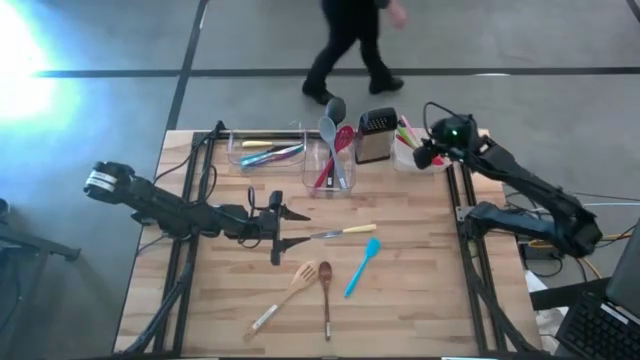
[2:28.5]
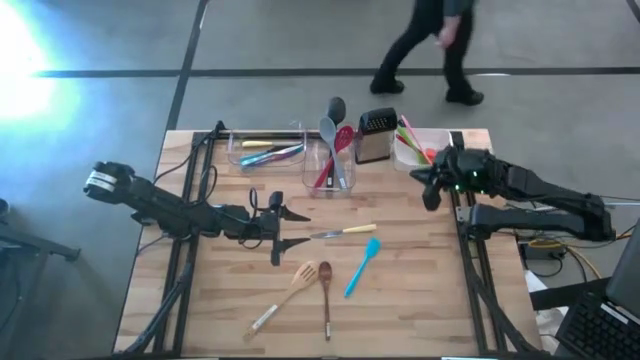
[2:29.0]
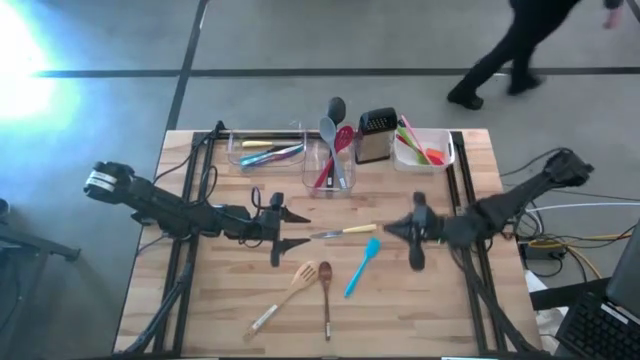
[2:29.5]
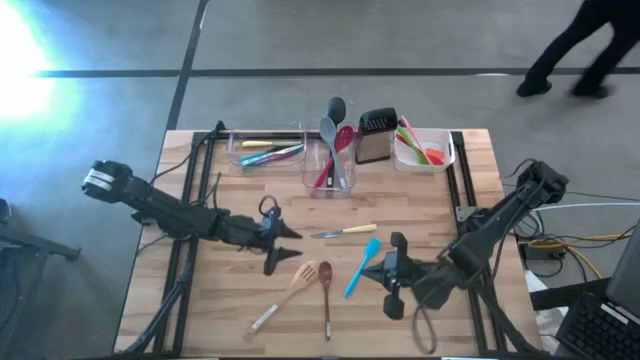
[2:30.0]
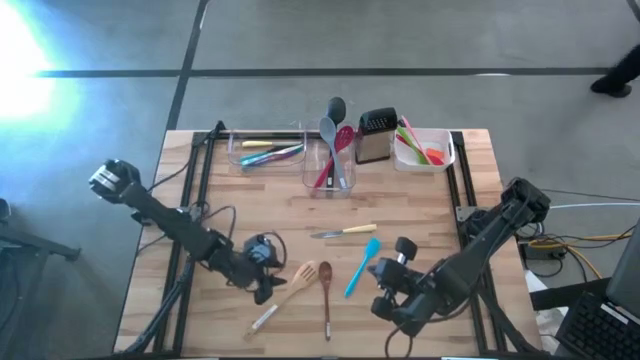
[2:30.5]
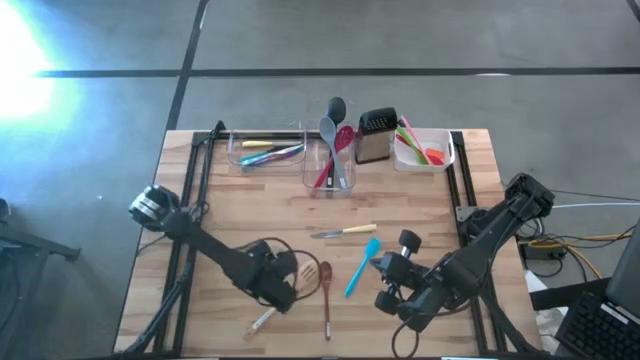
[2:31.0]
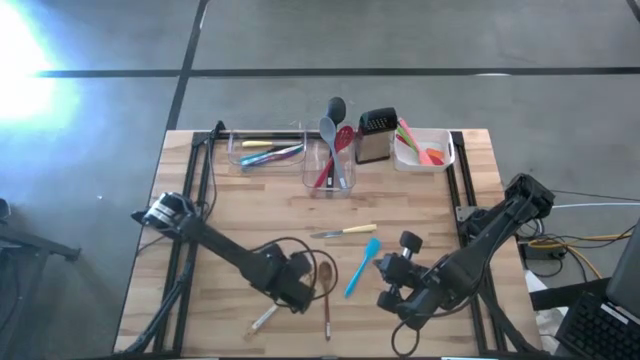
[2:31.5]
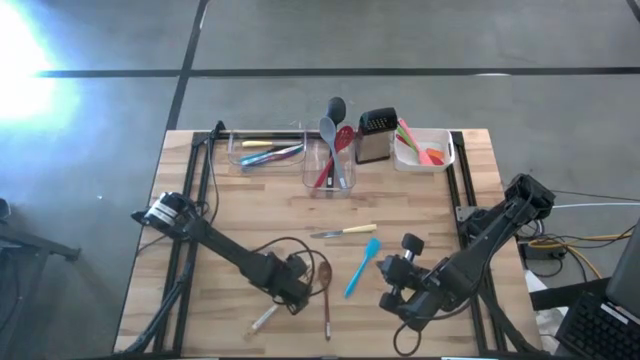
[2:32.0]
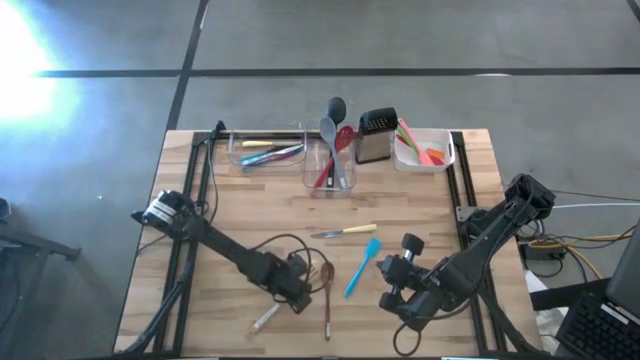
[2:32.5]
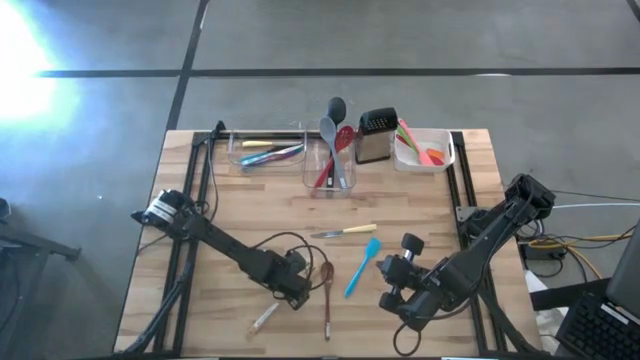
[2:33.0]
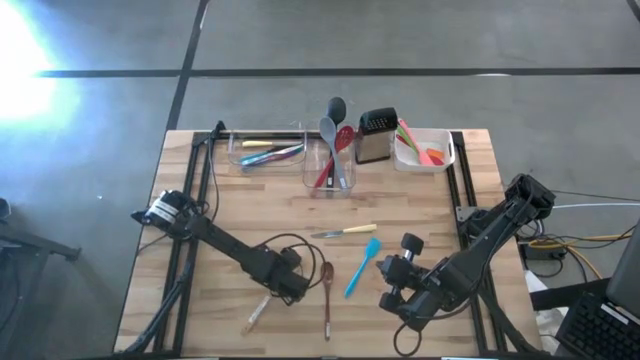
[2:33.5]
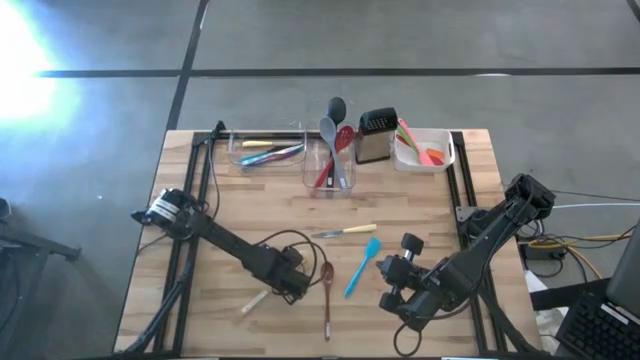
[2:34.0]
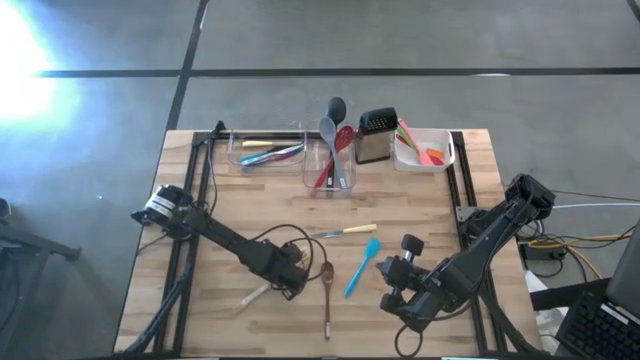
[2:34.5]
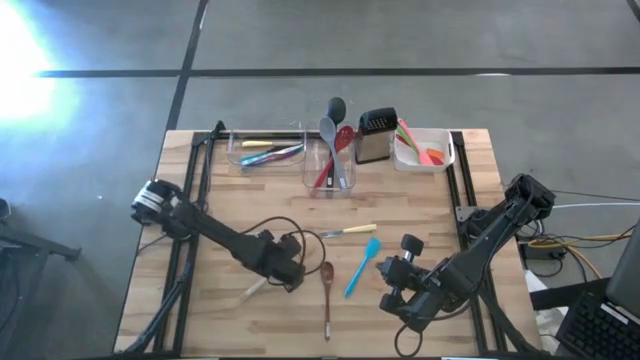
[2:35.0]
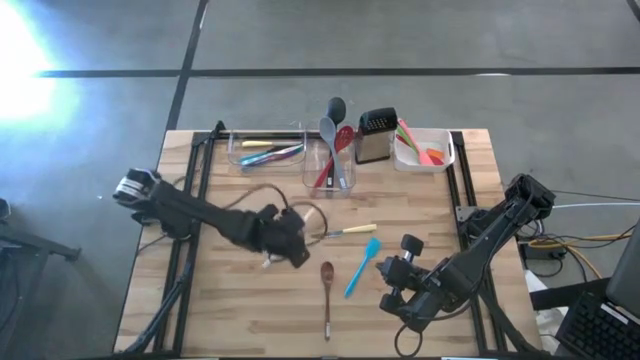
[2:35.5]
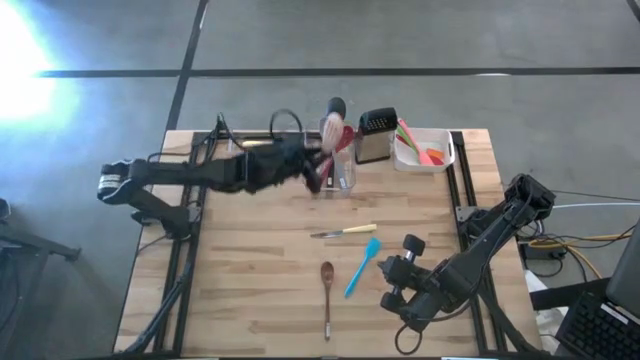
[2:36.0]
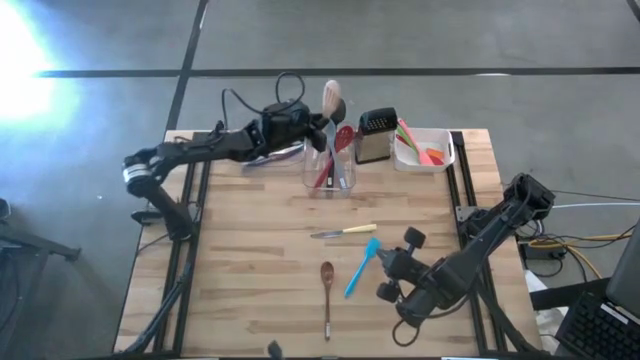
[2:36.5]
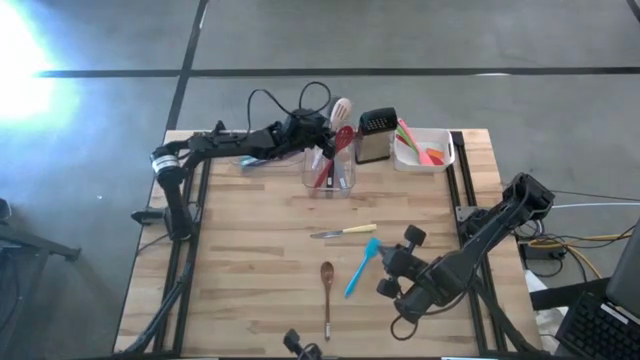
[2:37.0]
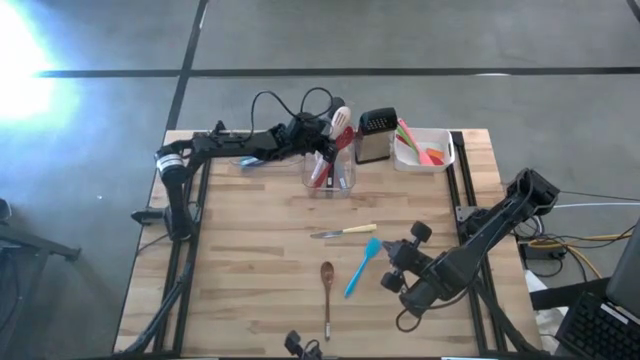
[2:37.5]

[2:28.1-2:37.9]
Task: Pick & Place Kitchen Items
Put the light brown serving spoon into the right transparent bin

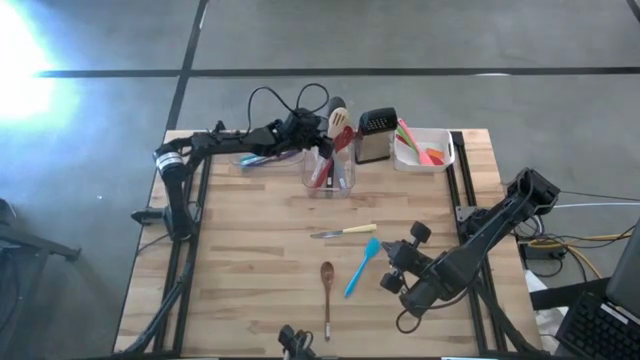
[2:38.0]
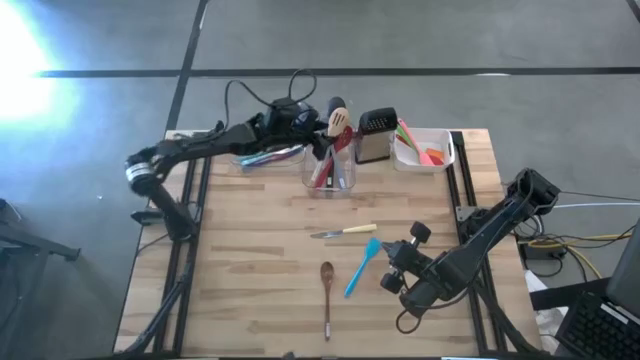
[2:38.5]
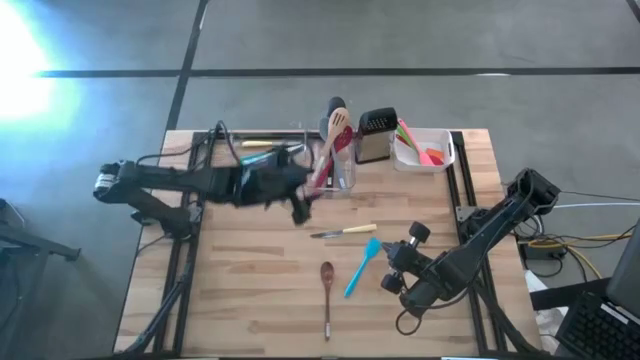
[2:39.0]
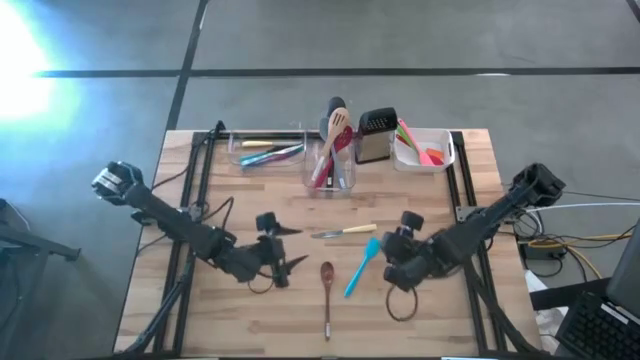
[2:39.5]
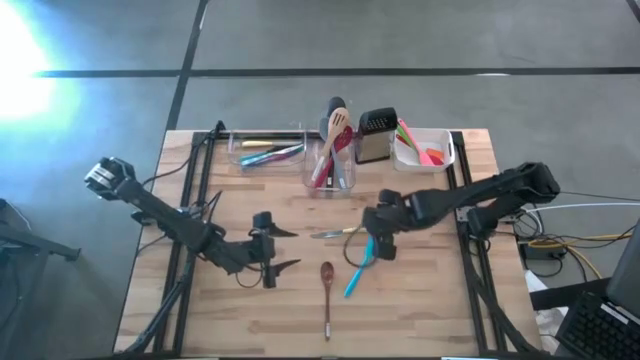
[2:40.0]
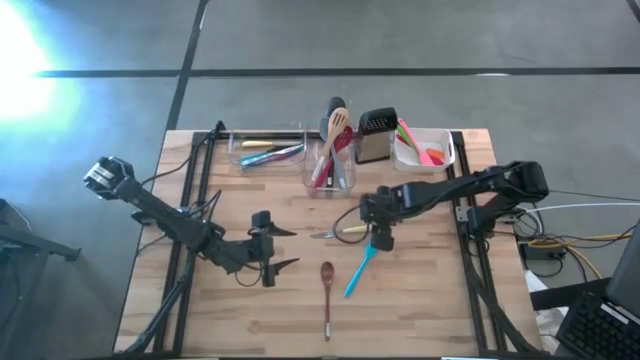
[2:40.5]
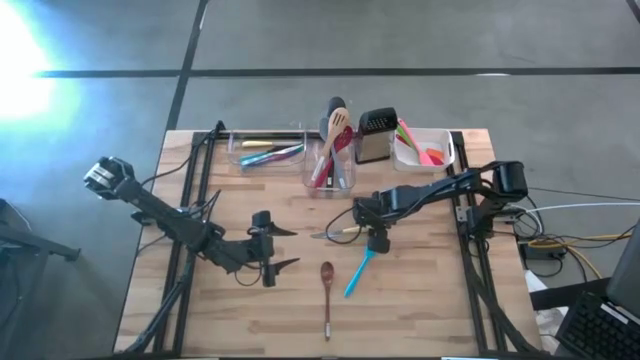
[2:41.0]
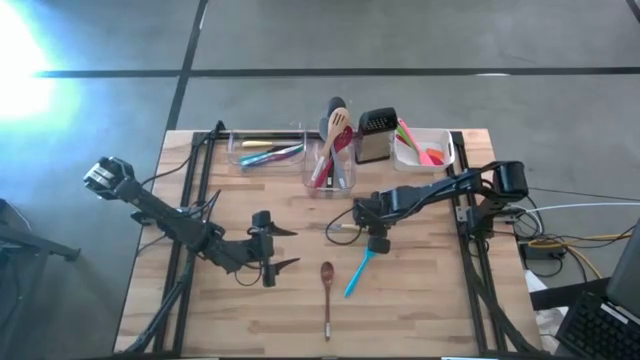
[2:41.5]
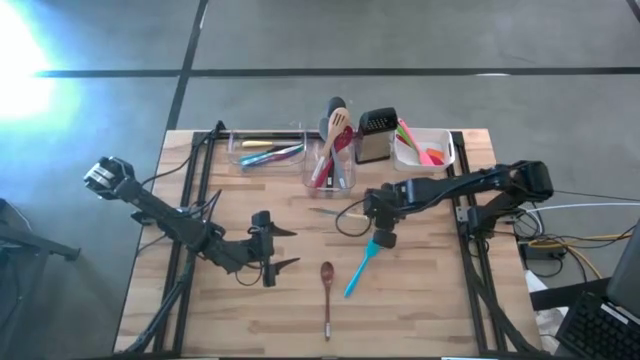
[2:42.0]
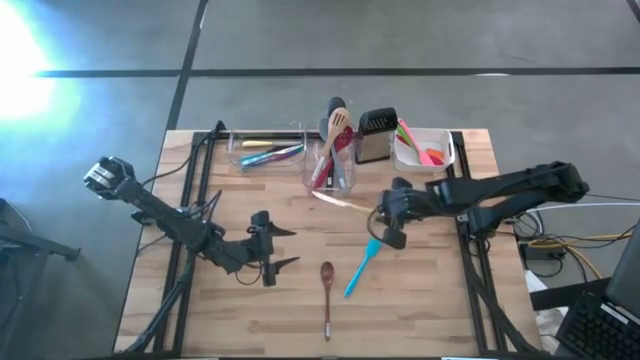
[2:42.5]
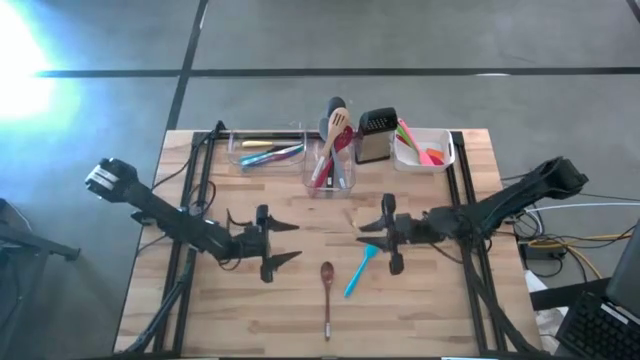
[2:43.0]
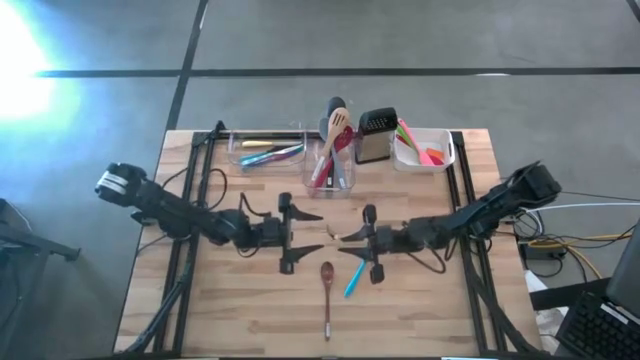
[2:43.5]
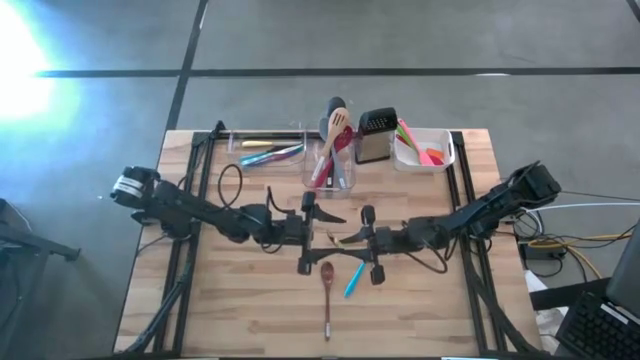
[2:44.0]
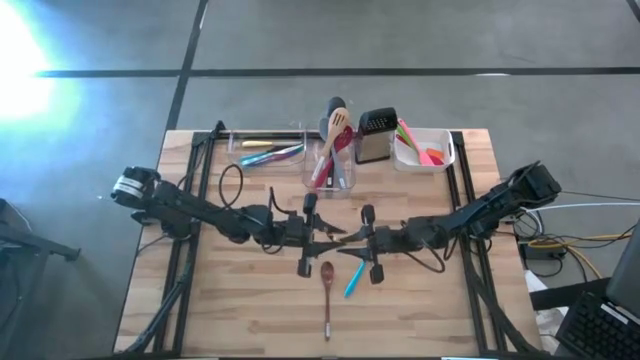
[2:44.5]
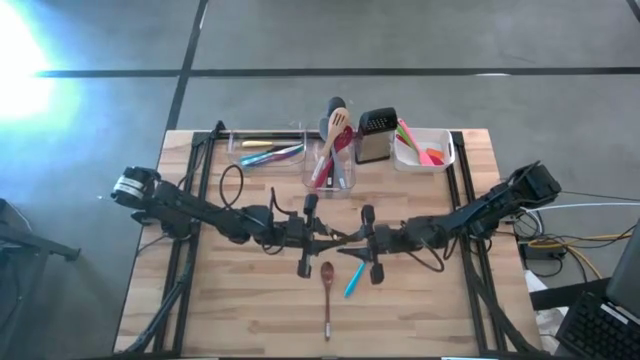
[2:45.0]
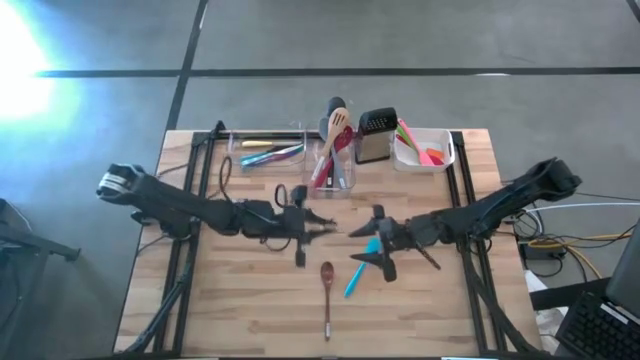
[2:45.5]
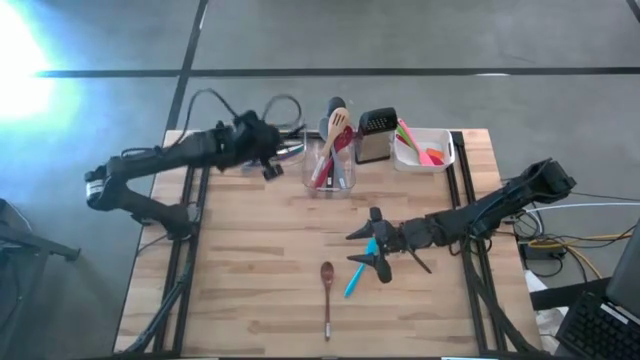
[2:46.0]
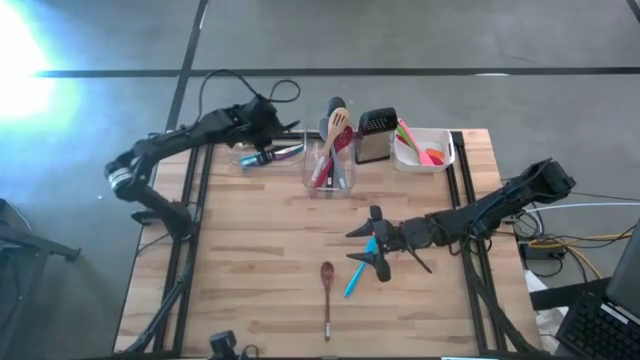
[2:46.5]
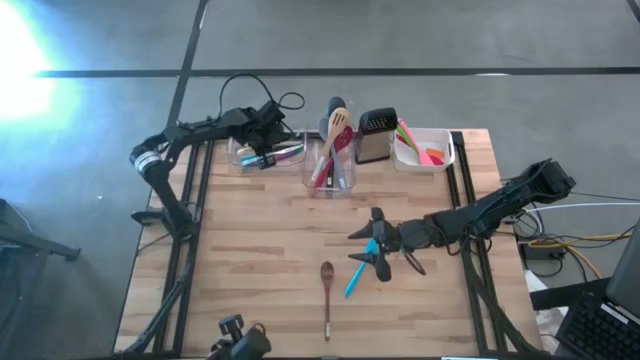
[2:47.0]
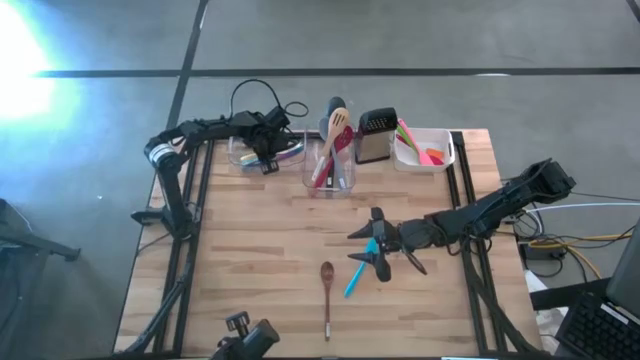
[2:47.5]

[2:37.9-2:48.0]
Put the yellow knife into the left transparent bin

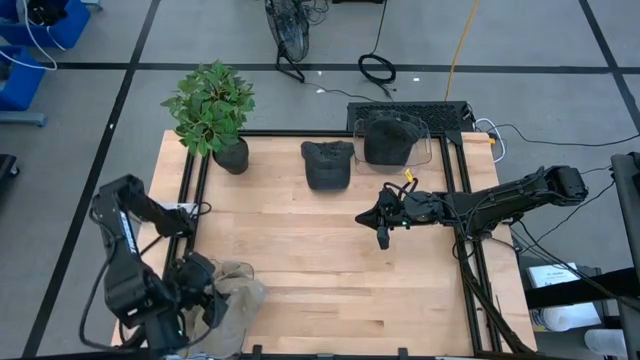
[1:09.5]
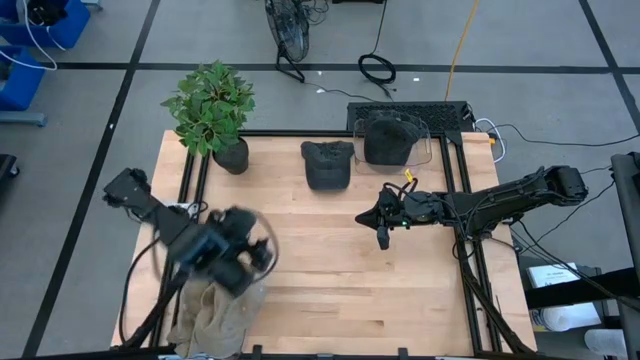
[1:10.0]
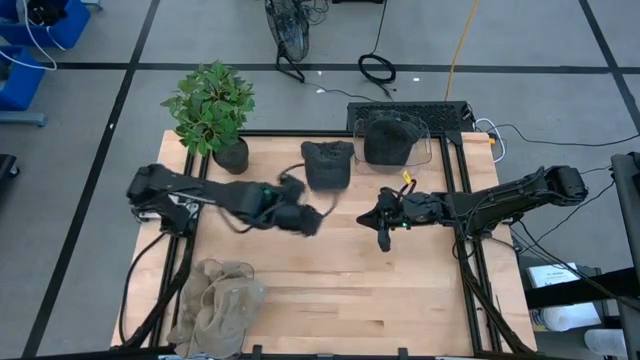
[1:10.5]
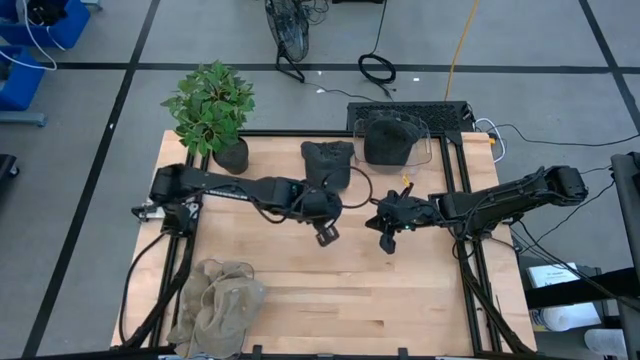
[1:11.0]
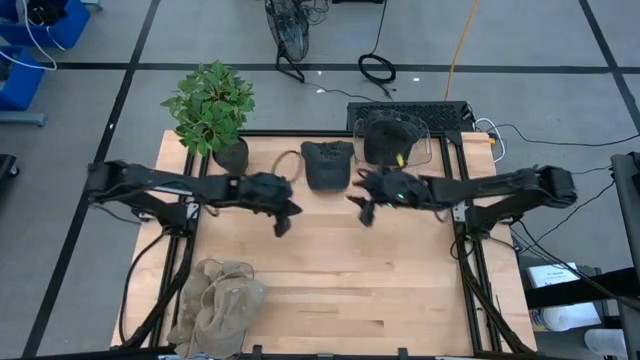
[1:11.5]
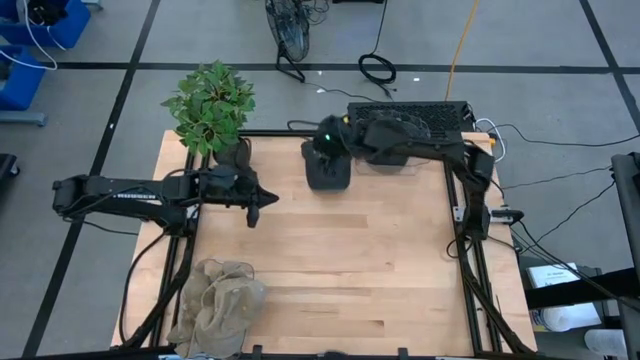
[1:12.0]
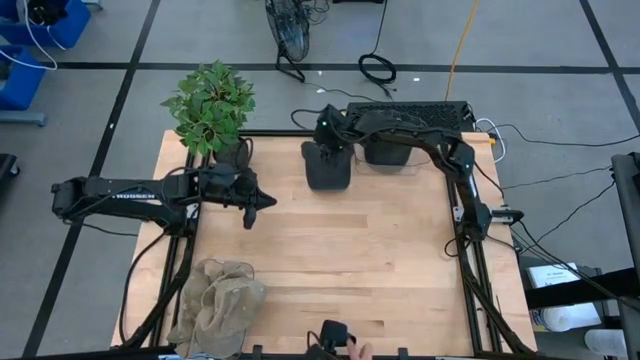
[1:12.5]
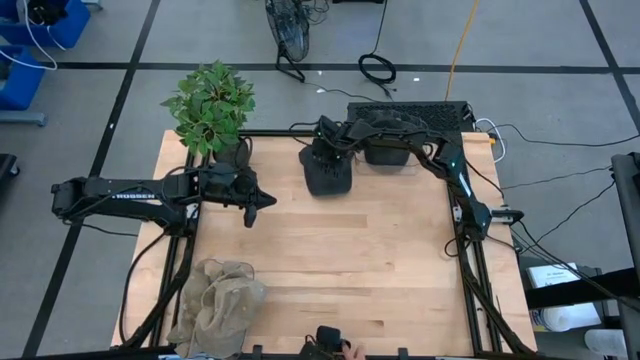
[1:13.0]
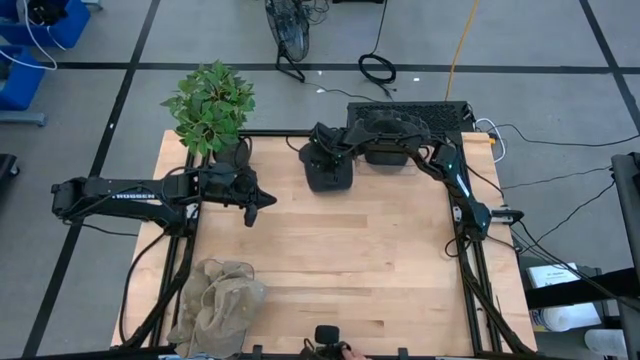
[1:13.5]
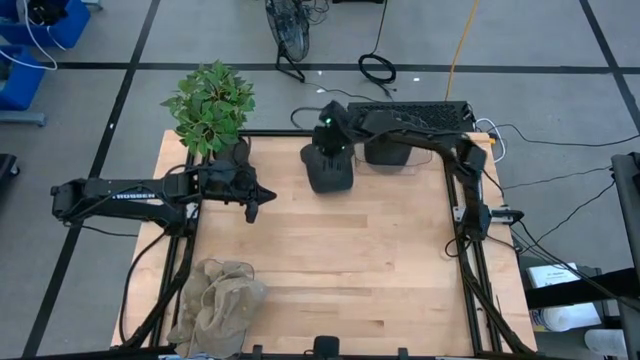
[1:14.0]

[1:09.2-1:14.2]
Task: Pick & Place hat
Put the black cap into the top transparent bin
